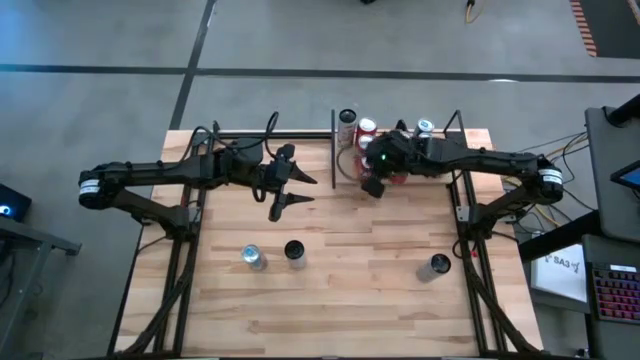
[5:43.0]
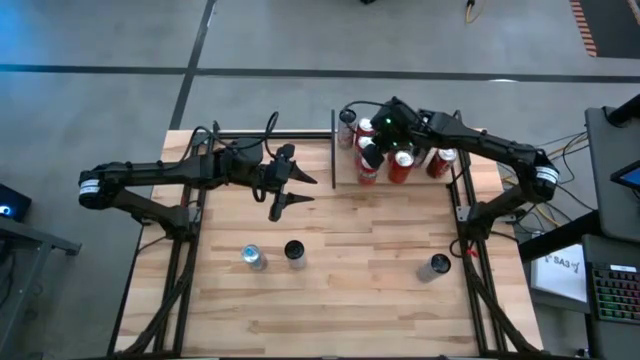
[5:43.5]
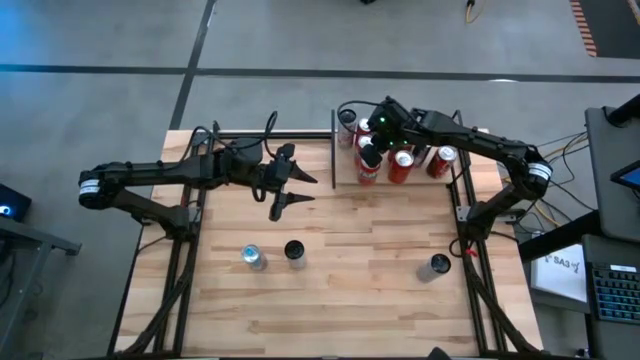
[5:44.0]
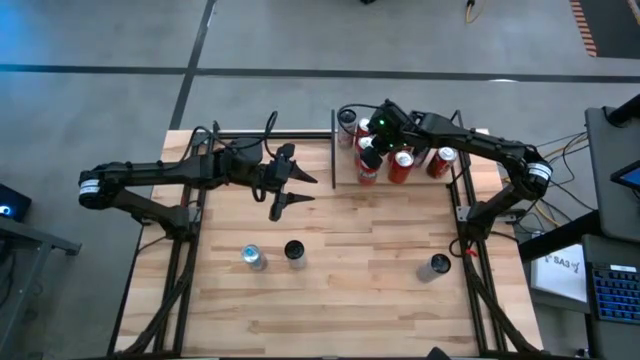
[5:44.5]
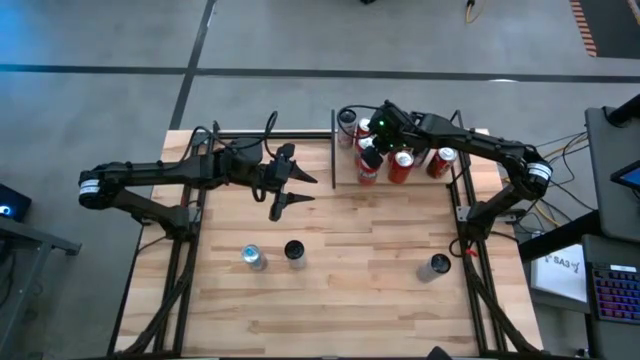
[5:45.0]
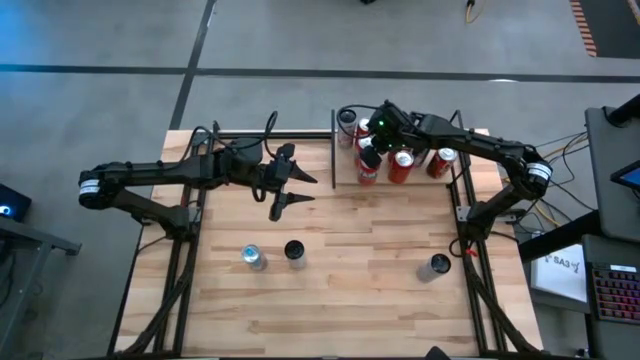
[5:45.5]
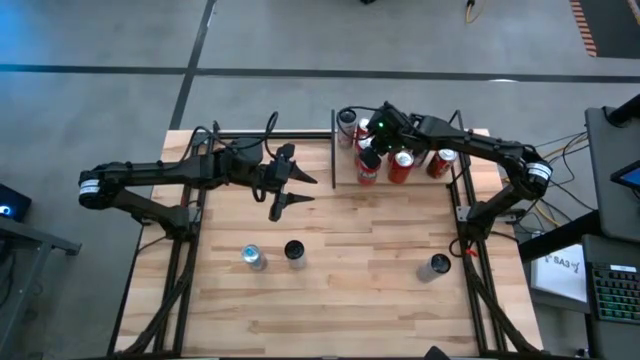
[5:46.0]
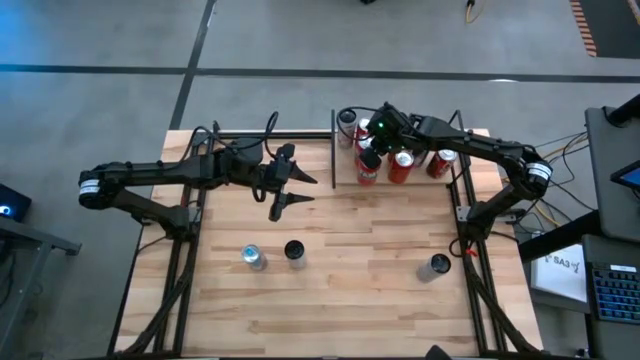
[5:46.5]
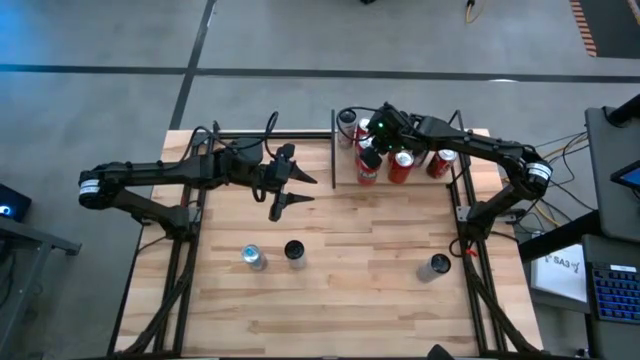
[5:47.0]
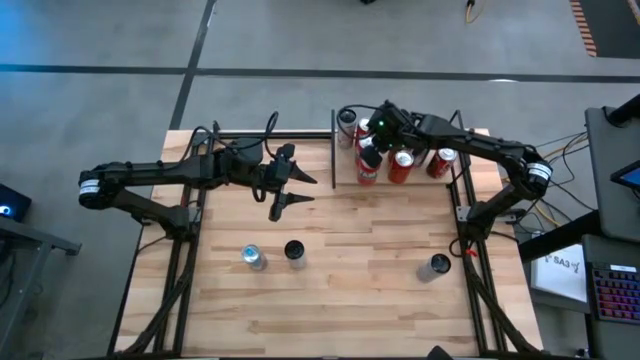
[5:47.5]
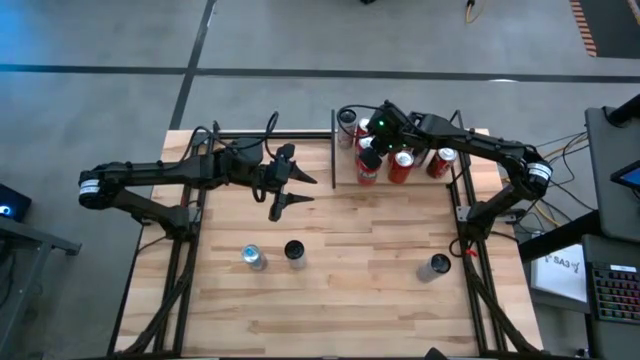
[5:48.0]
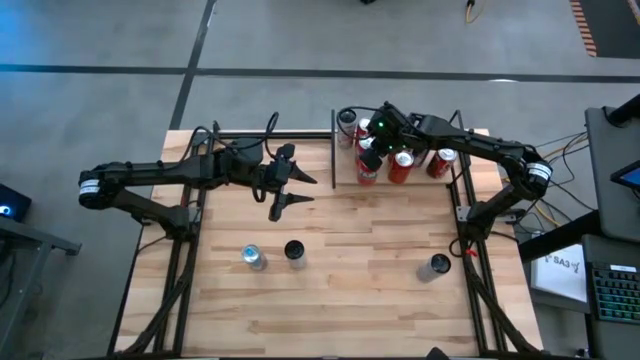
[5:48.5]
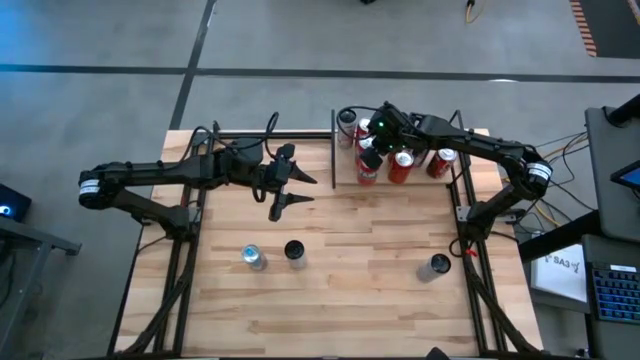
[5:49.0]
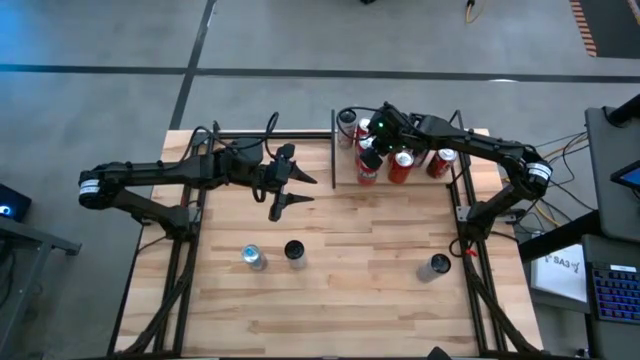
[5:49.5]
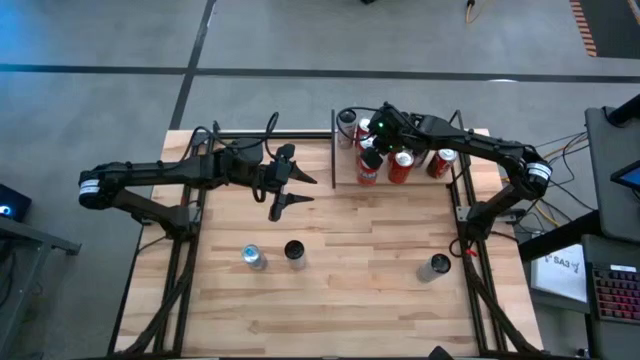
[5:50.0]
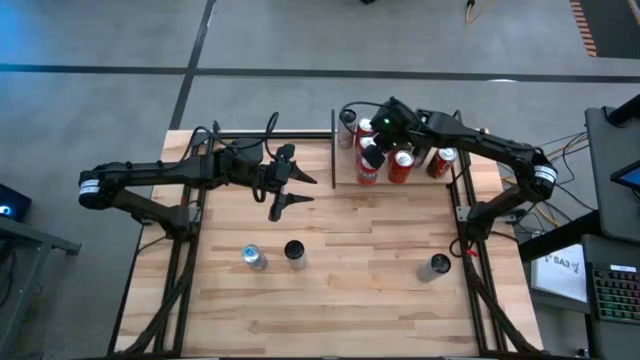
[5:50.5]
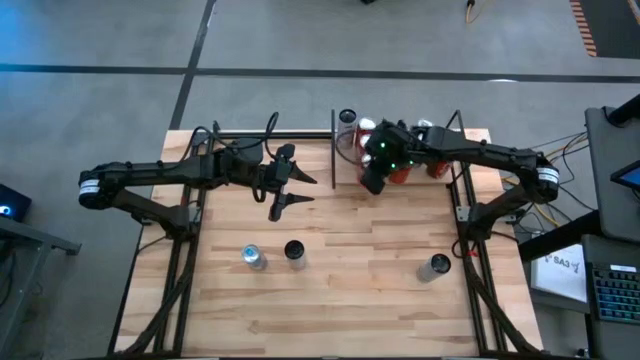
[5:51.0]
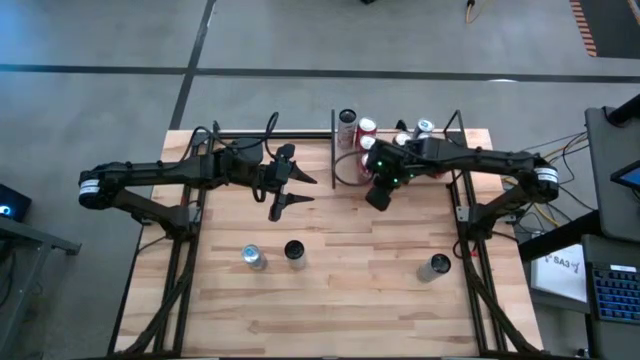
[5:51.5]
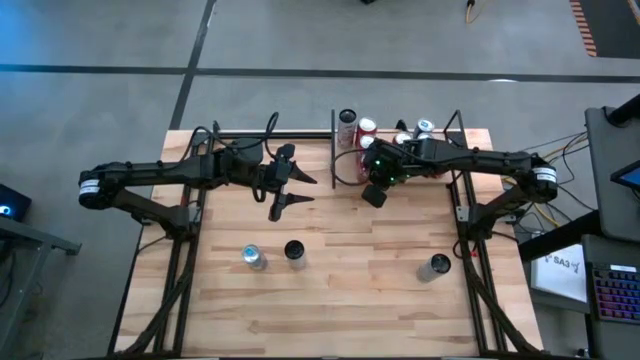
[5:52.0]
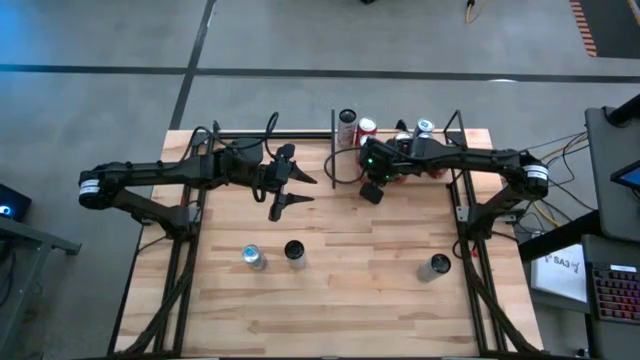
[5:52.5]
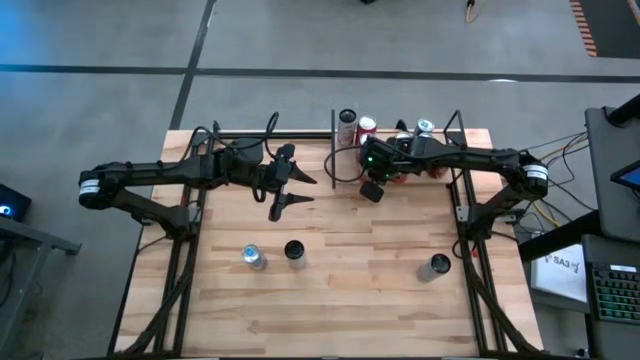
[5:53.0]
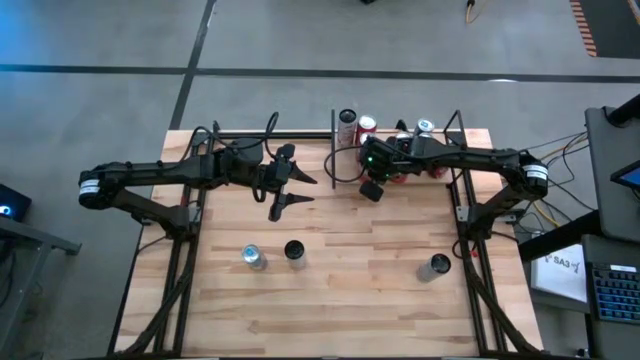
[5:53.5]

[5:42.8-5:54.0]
Task: Place canned beverage on shelf
Adjust the orange soda cans on the shelf

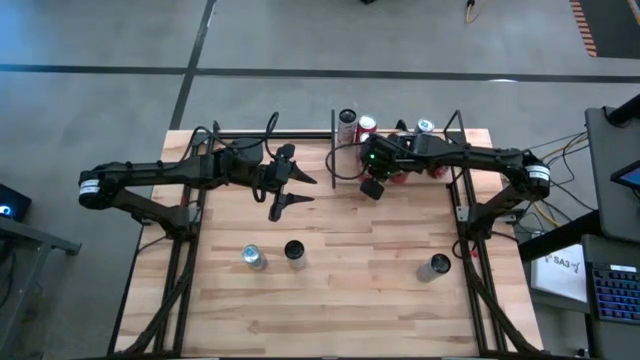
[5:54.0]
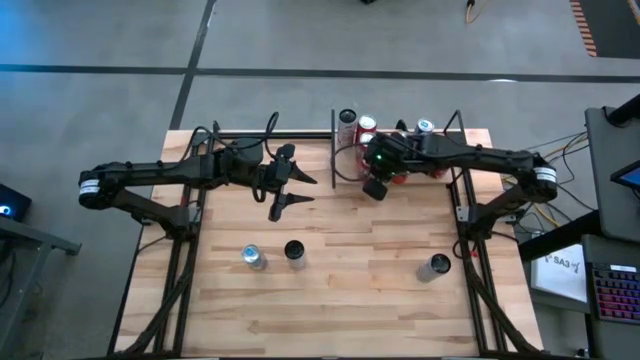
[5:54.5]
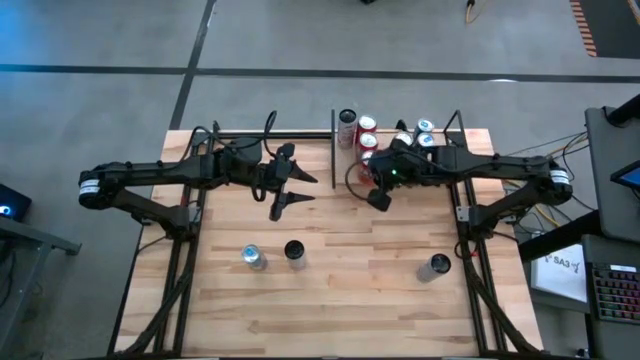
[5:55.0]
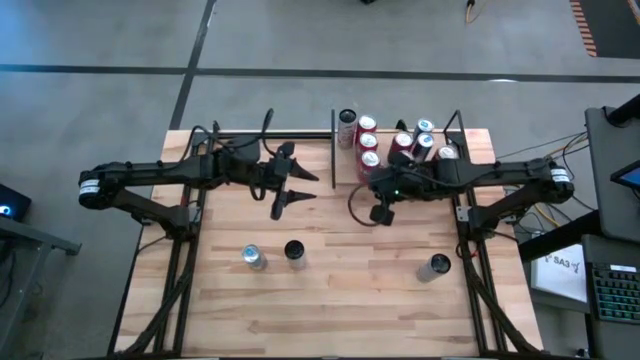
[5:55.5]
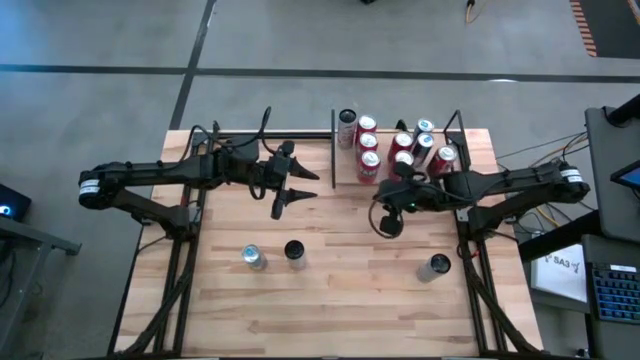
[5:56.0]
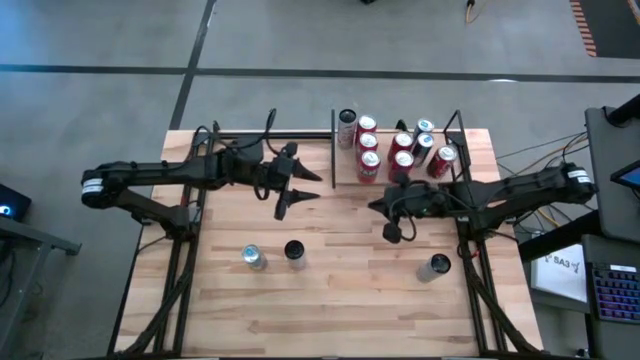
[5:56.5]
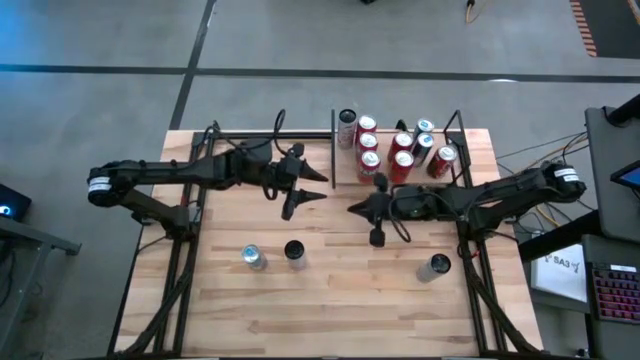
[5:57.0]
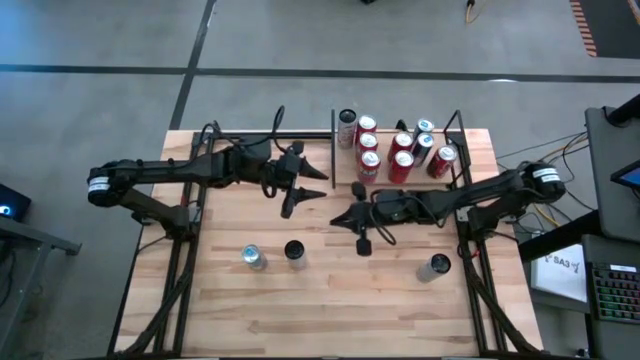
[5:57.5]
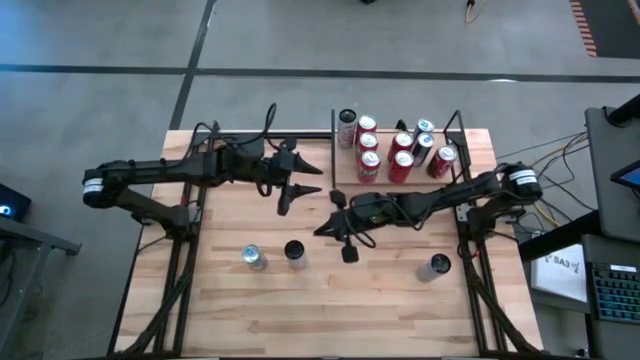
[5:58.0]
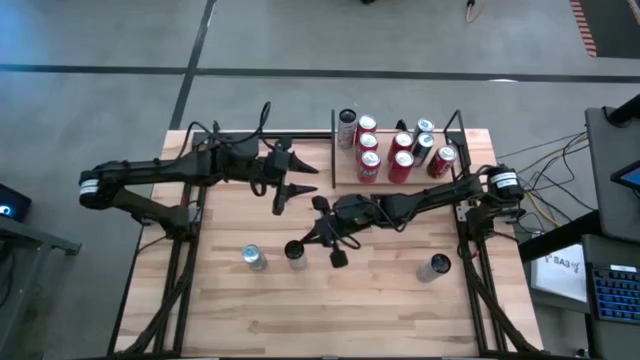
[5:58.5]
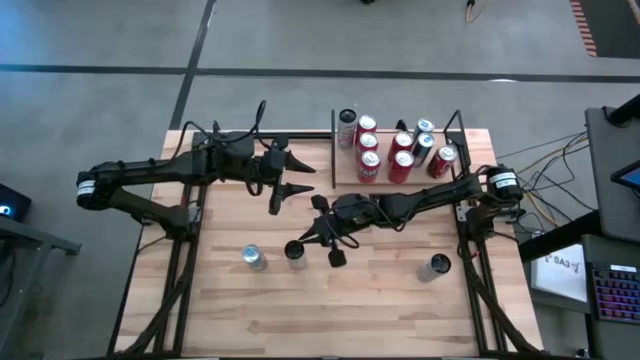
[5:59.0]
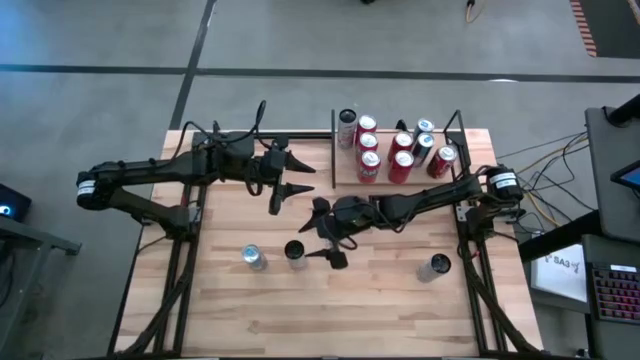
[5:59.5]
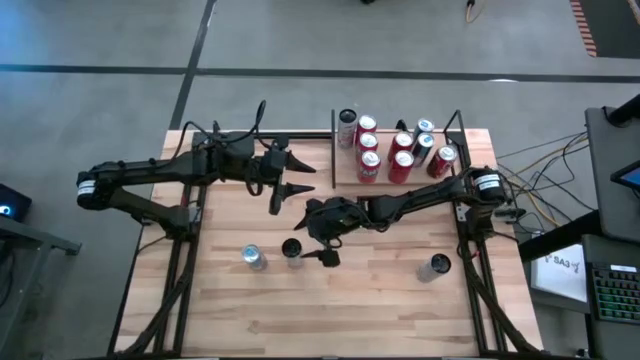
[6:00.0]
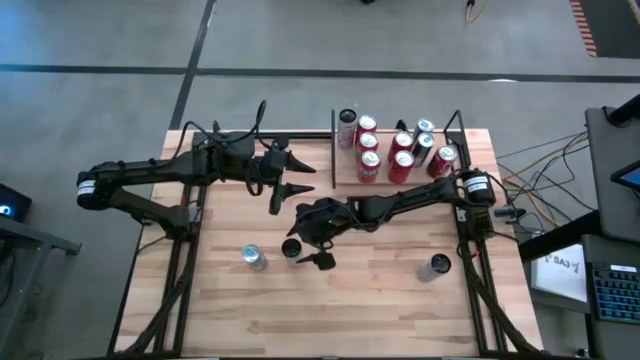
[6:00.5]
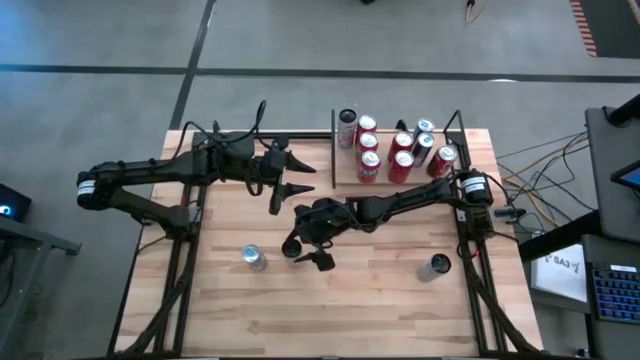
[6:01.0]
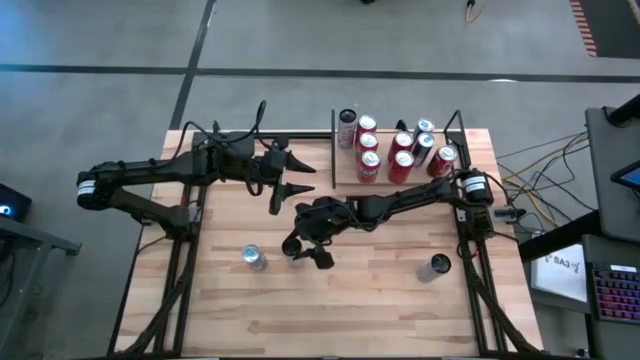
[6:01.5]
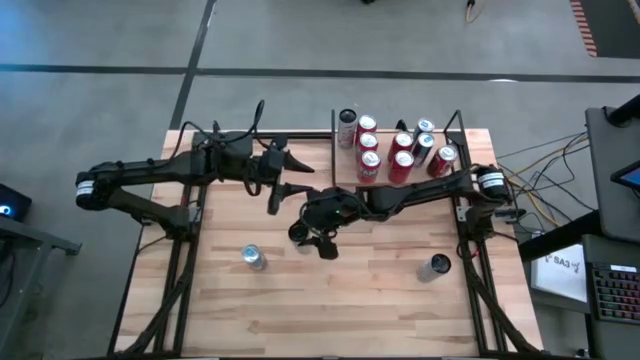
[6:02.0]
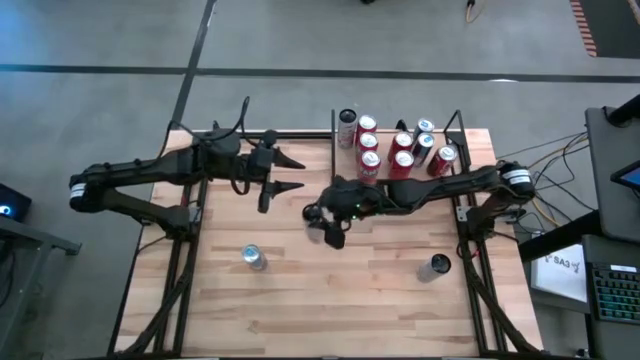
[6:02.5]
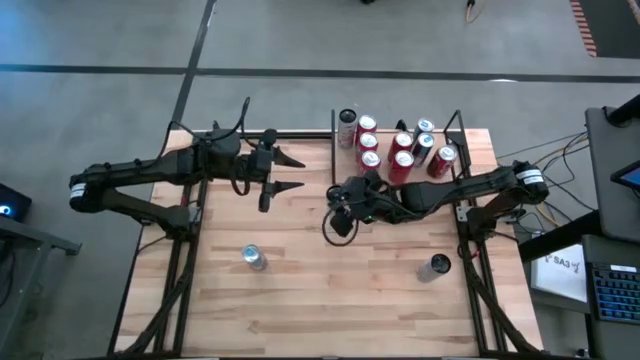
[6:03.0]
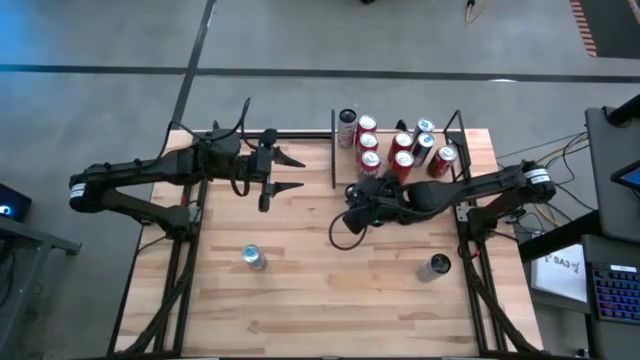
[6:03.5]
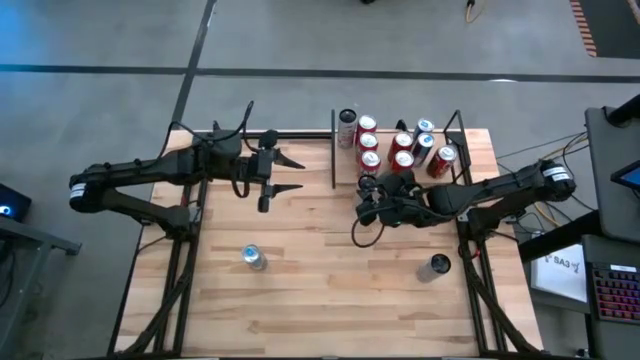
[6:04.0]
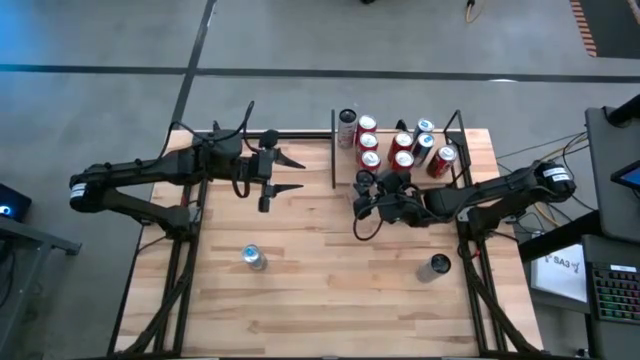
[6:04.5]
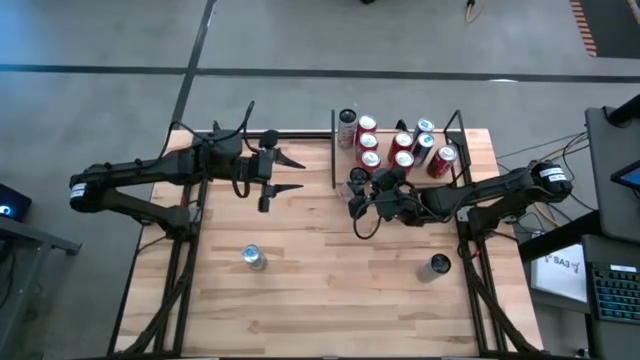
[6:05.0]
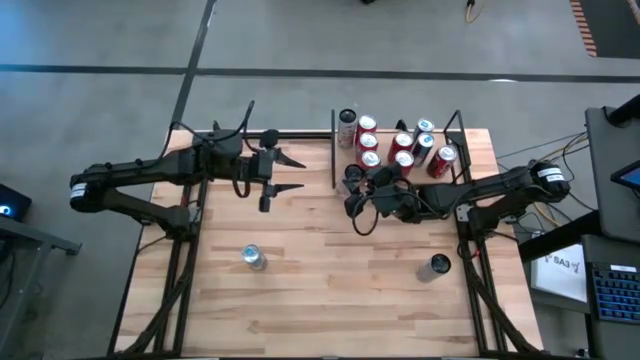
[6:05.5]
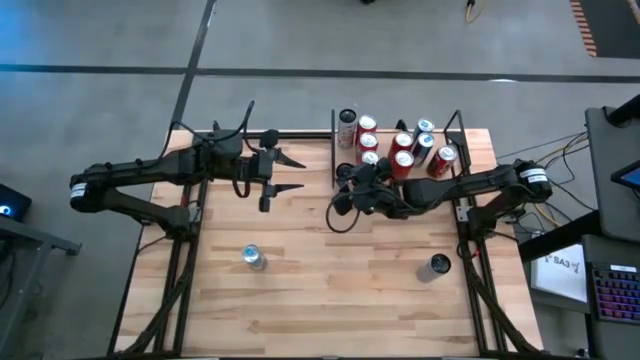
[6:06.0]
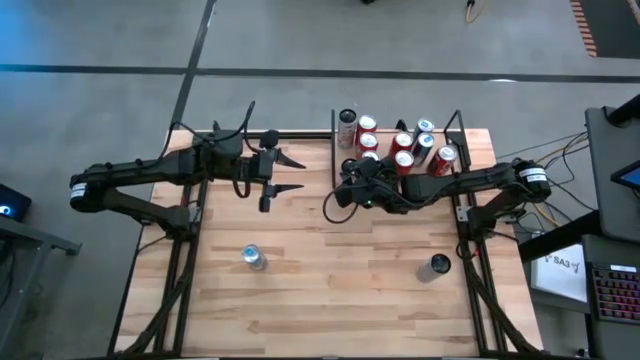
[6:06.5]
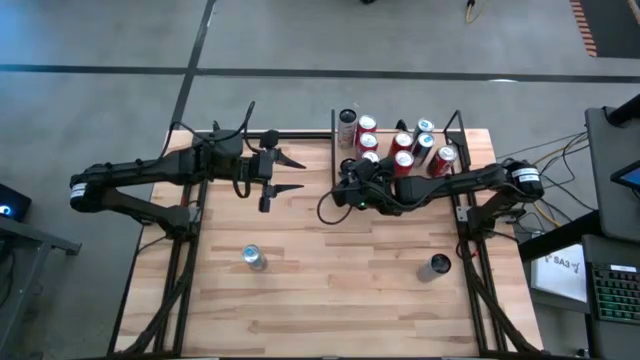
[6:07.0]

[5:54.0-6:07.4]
Put the left white soda can on the shelf aligned with the other white soda can
